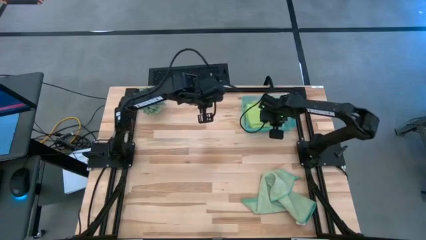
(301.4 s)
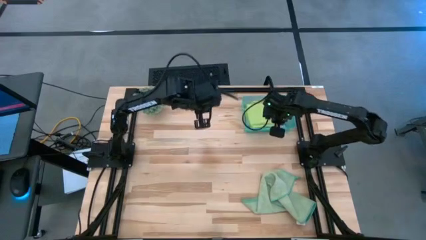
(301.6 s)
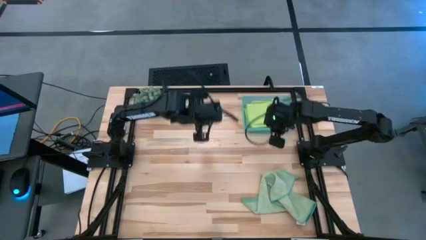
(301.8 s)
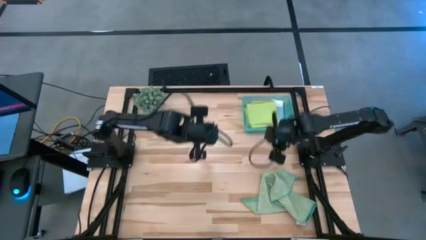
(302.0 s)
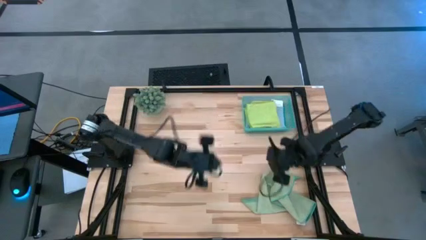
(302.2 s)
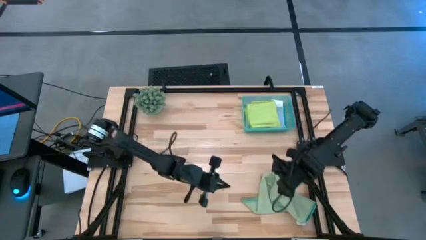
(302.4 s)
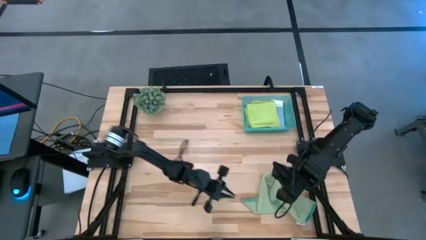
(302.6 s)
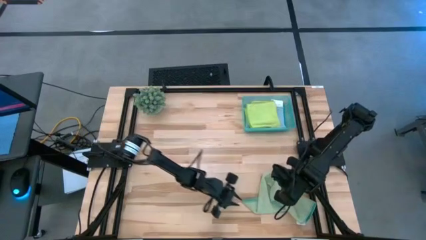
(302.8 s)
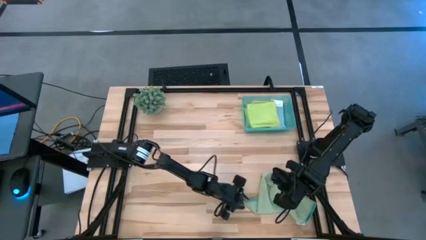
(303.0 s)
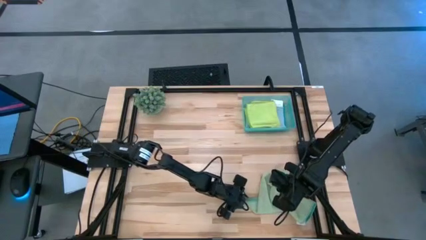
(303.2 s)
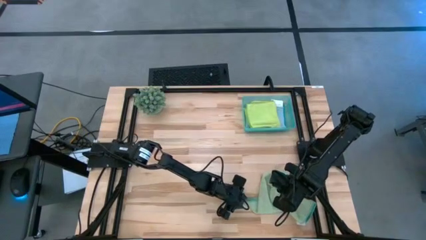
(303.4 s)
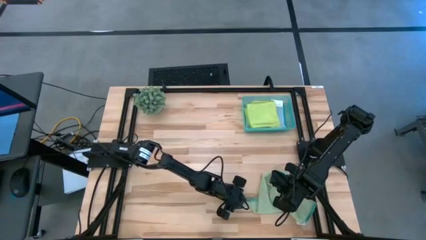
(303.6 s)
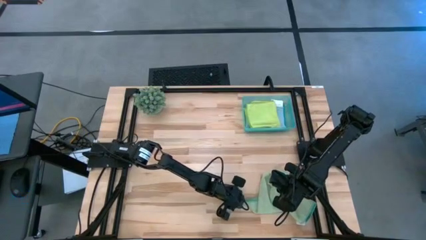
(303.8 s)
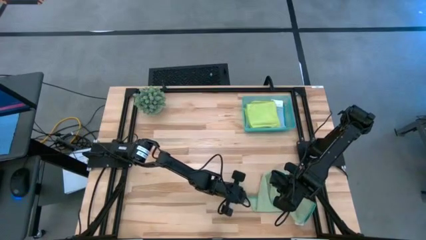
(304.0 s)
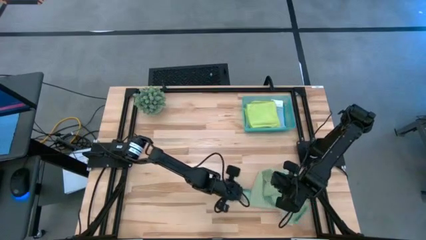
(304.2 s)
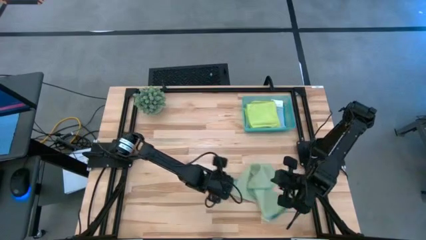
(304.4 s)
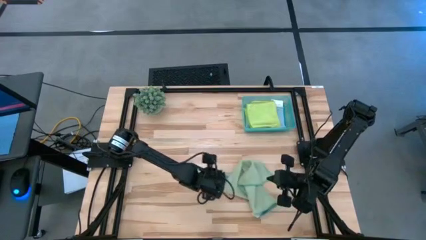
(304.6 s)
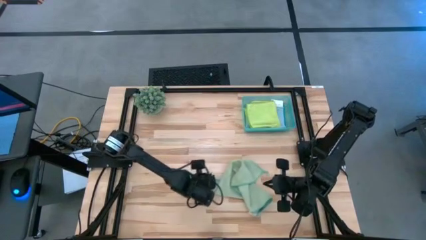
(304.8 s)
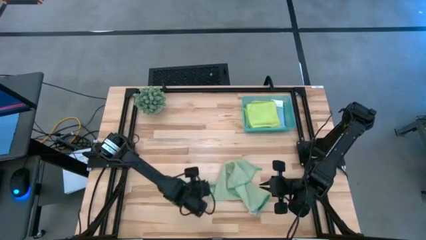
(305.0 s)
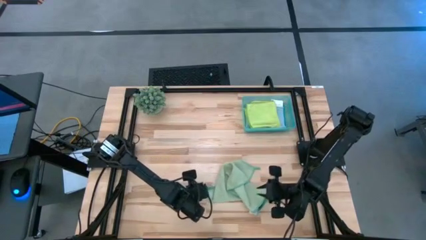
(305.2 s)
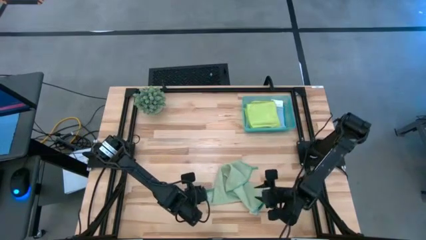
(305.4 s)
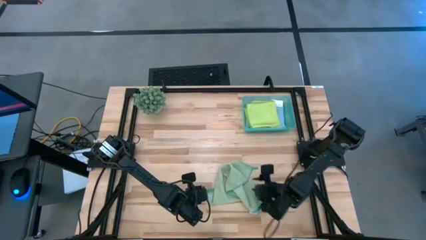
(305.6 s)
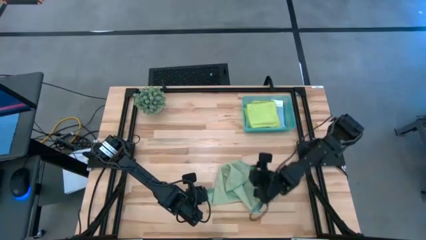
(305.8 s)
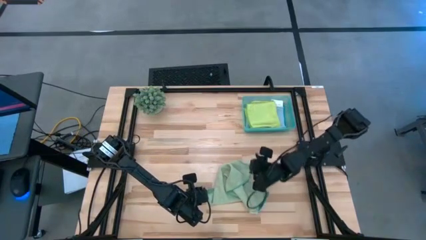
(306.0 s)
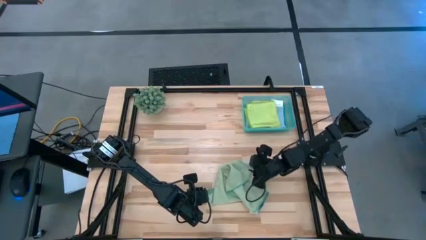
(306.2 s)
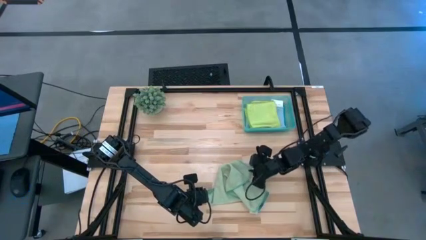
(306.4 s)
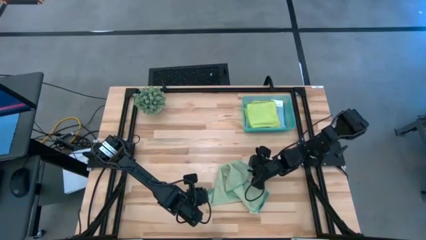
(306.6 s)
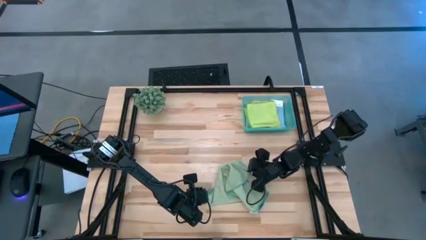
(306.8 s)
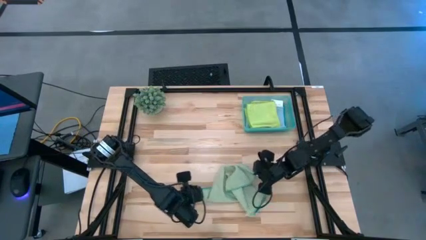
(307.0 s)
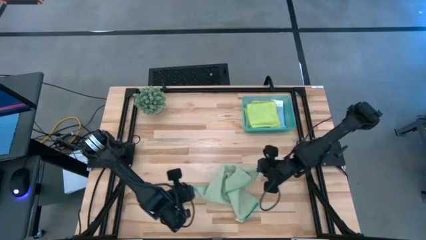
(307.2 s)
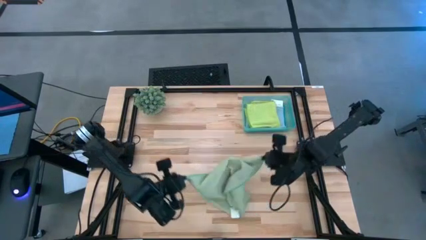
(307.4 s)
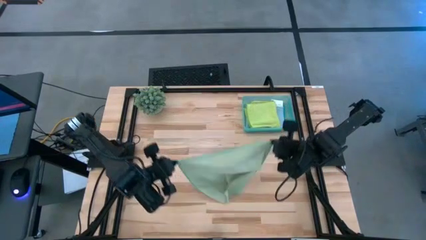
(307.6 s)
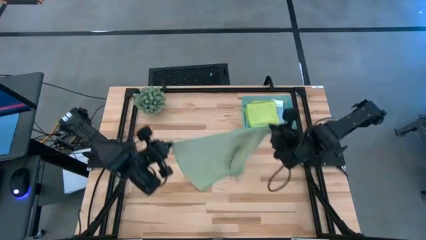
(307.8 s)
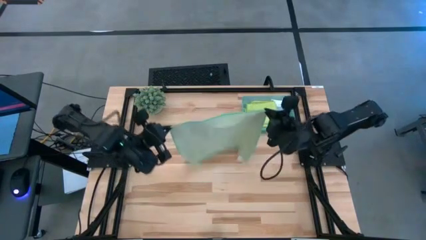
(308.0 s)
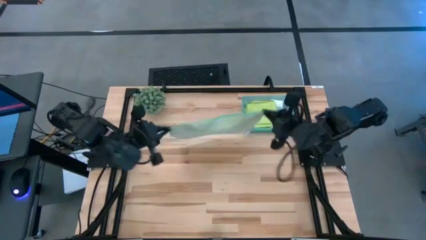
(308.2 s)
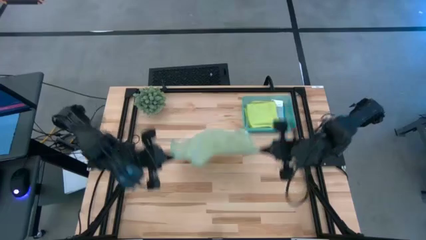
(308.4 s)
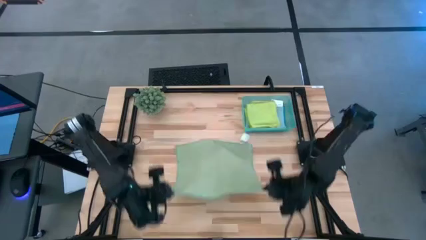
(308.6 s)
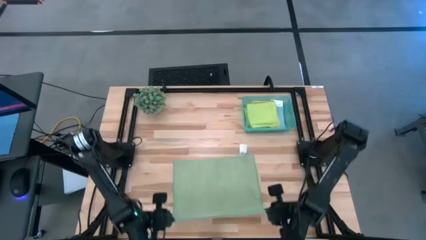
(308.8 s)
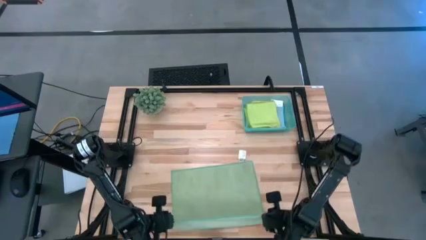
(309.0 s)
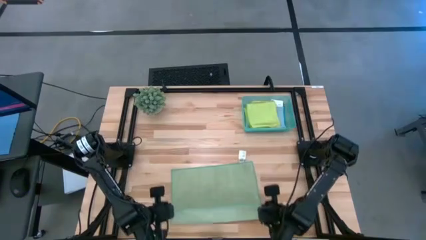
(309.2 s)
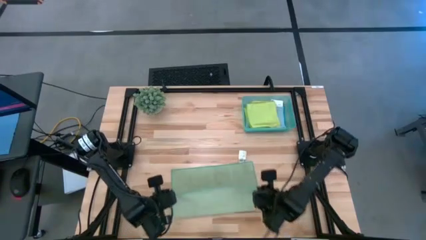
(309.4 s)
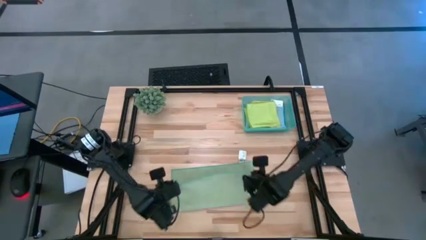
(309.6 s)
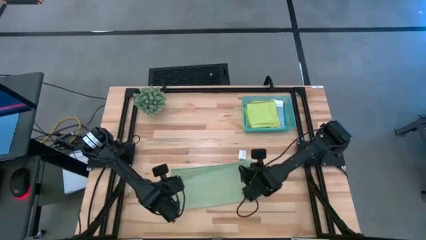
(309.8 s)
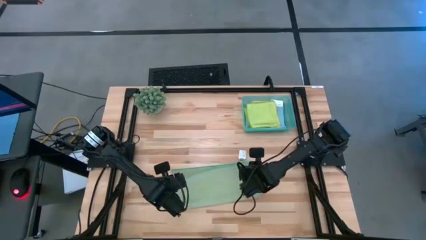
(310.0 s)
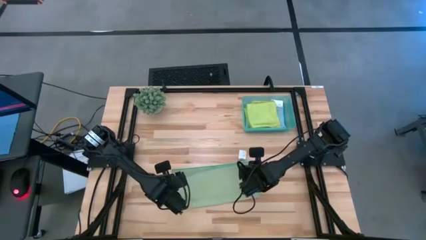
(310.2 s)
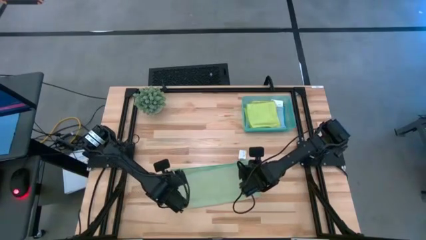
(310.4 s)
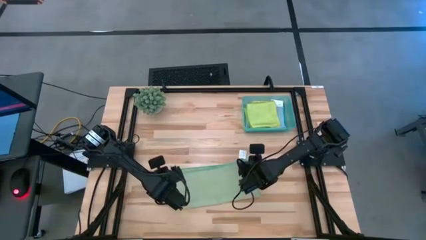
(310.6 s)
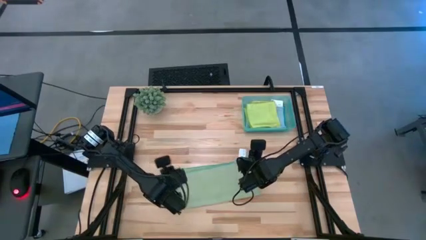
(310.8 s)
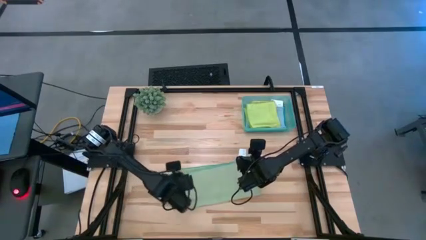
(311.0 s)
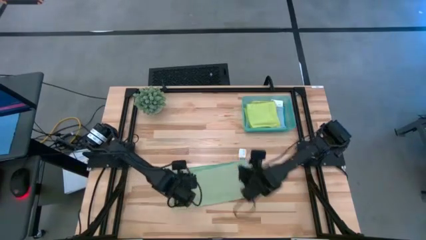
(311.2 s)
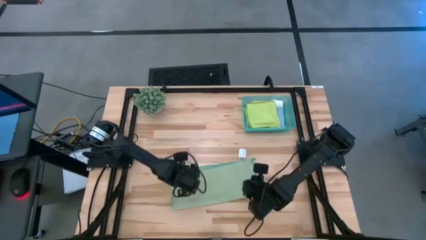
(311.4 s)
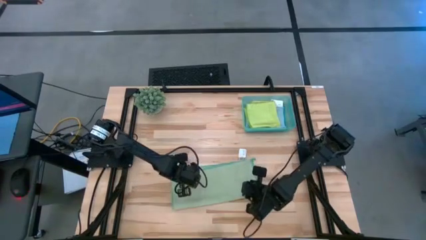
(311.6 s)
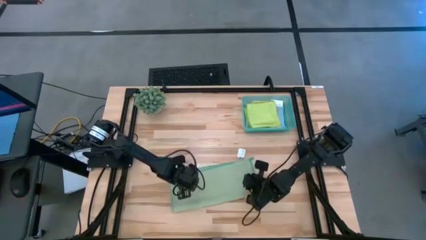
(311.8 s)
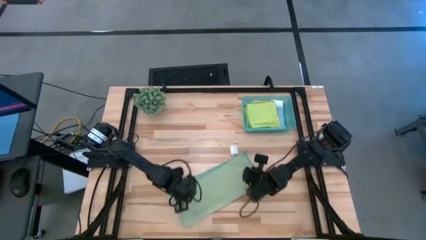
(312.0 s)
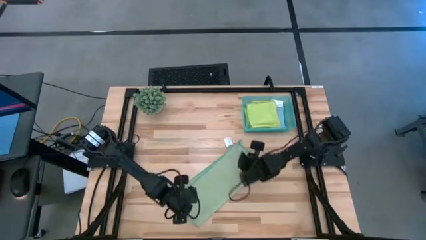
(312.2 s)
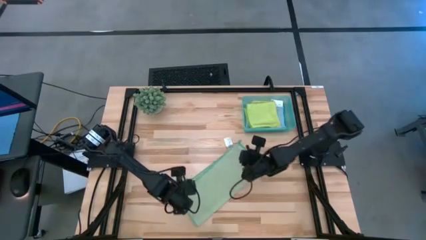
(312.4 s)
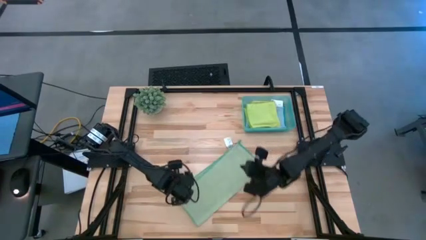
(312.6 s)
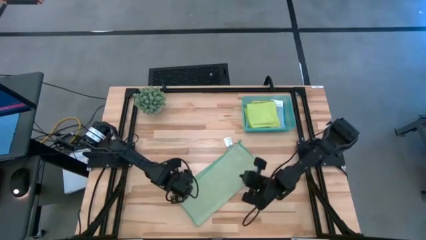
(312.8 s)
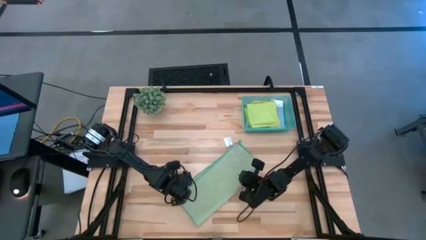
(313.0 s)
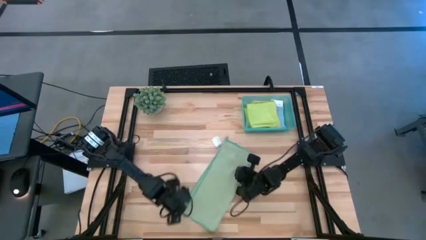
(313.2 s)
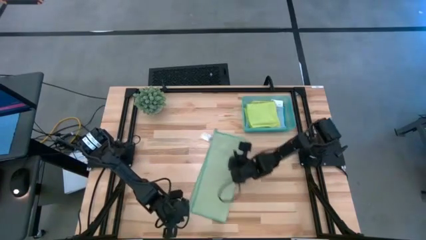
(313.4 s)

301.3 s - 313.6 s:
Task: Fold microfiber towels
Fold the light green microfiber cloth

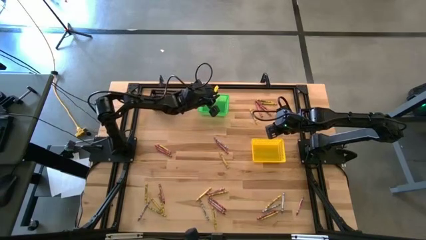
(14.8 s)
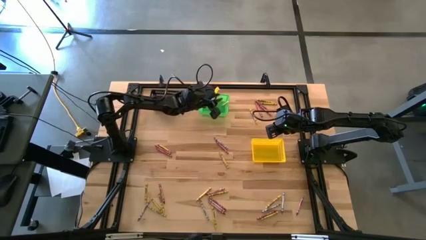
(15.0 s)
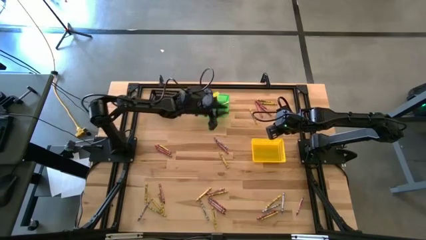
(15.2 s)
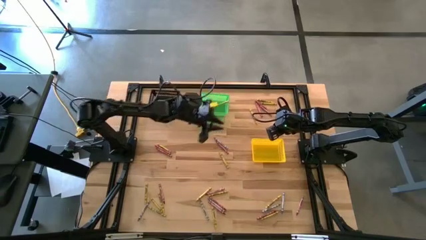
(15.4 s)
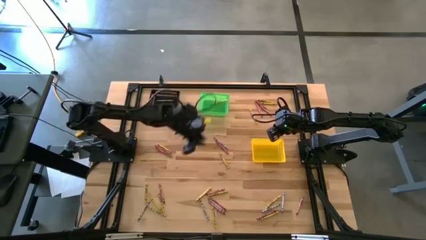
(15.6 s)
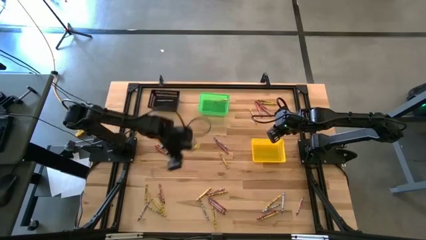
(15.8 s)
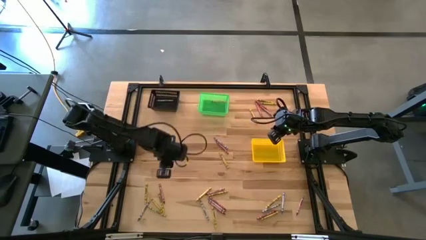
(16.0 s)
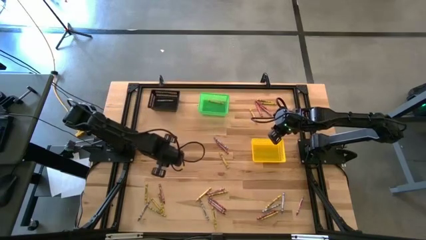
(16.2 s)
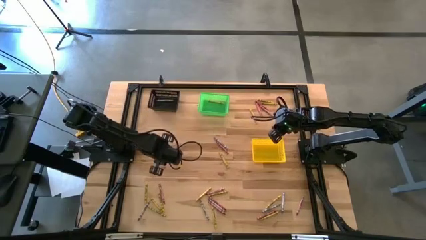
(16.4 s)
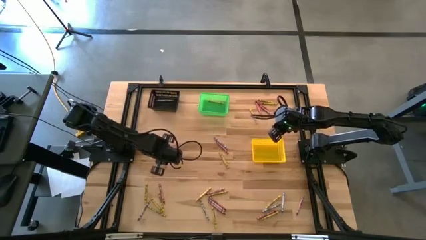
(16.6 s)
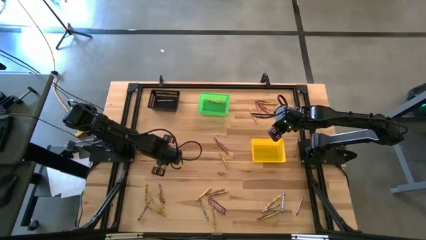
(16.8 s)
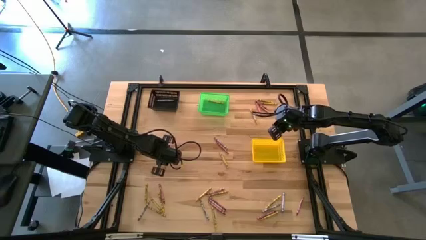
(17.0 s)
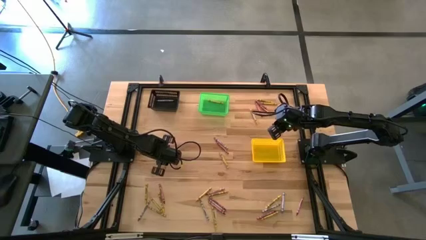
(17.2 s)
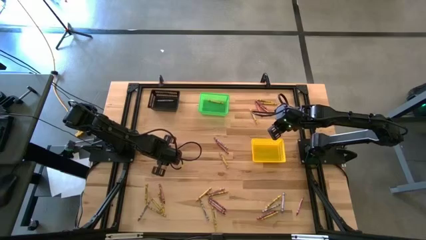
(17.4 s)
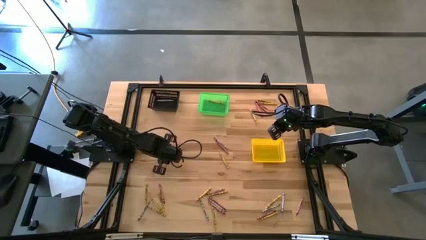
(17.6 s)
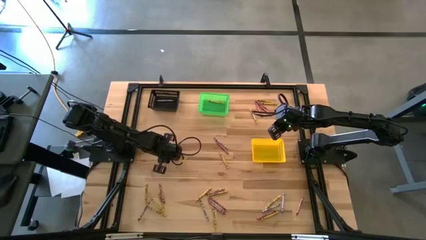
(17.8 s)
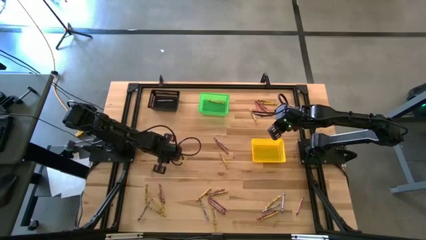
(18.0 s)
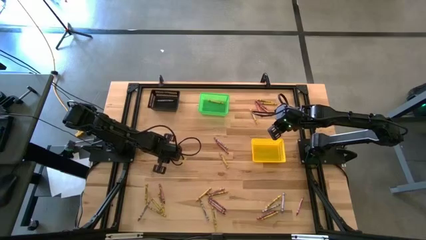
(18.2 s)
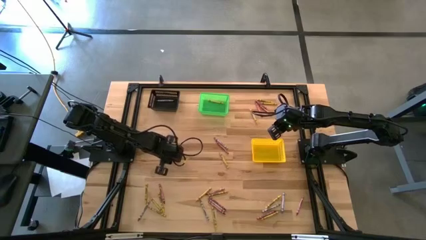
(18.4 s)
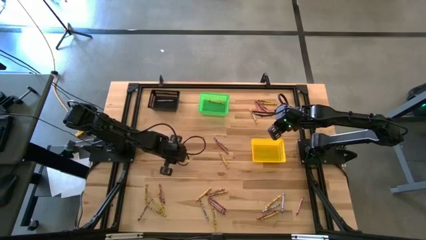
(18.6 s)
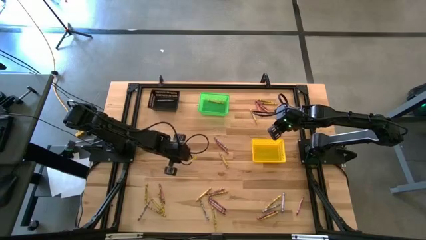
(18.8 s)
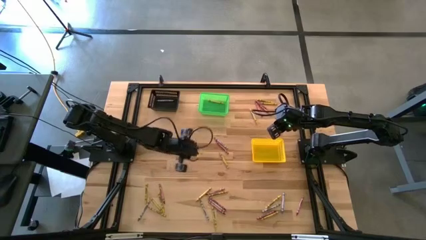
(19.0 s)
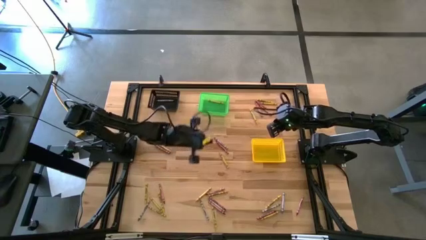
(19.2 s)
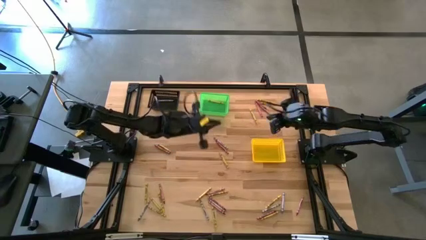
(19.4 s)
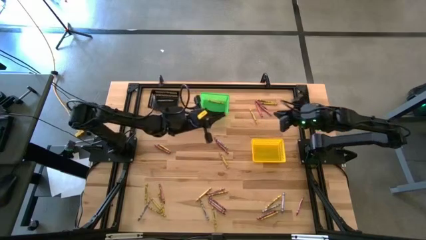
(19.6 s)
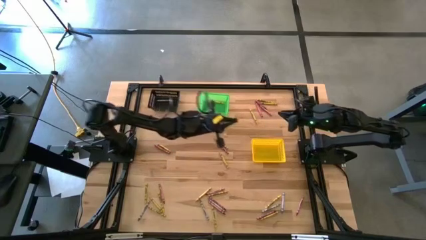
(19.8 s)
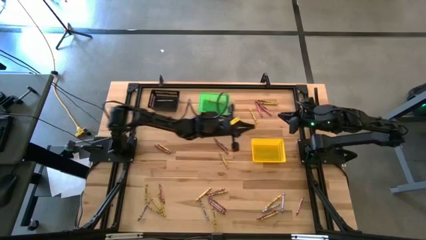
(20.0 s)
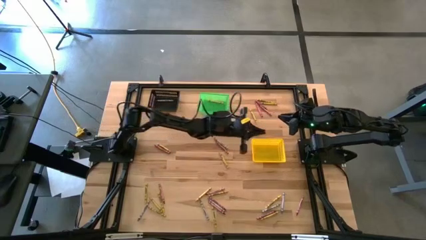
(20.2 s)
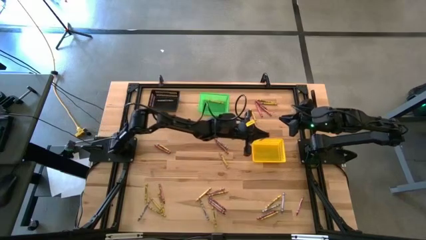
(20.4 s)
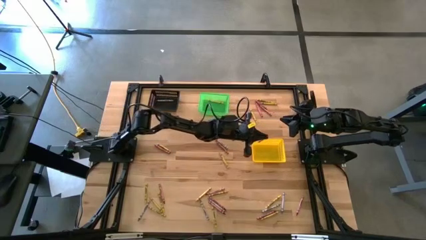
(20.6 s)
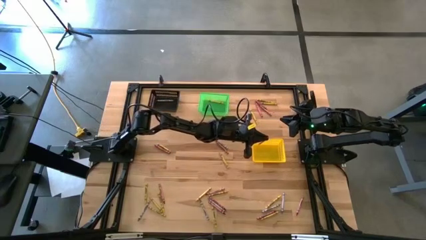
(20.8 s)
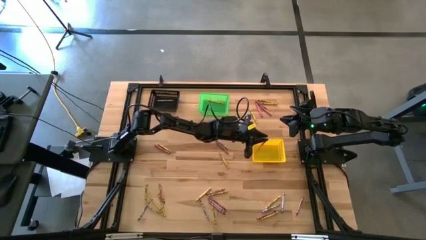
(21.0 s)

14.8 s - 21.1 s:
Task: Sort crayons
Put the red crayon into the yellow basket
